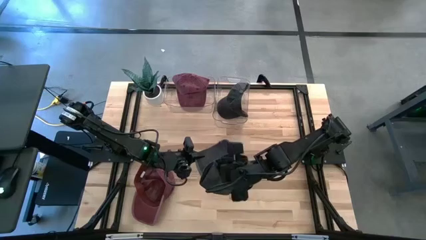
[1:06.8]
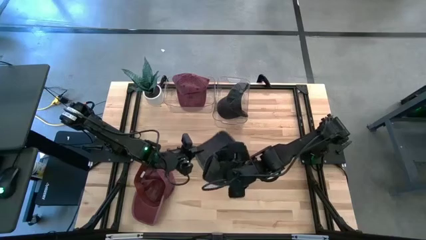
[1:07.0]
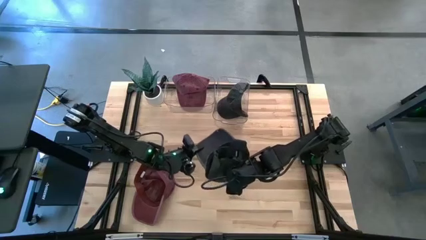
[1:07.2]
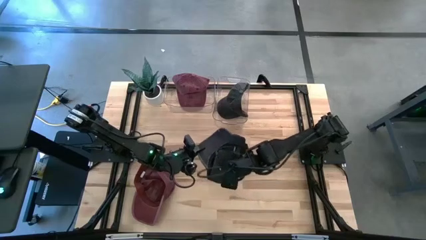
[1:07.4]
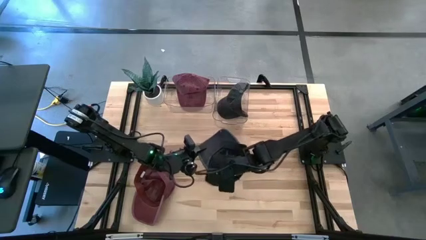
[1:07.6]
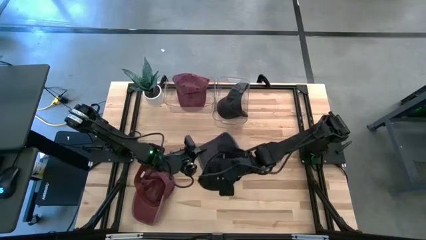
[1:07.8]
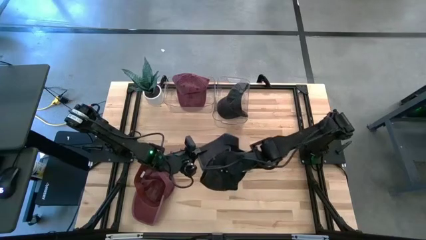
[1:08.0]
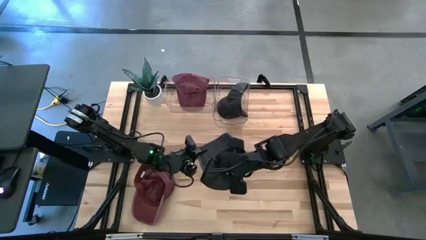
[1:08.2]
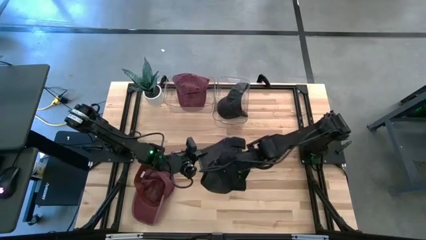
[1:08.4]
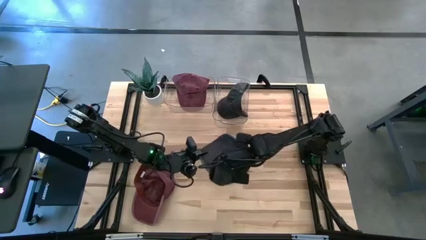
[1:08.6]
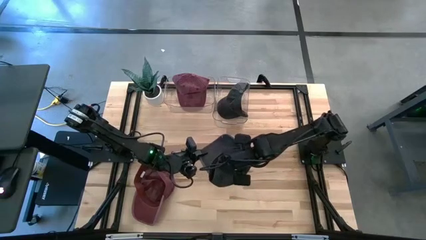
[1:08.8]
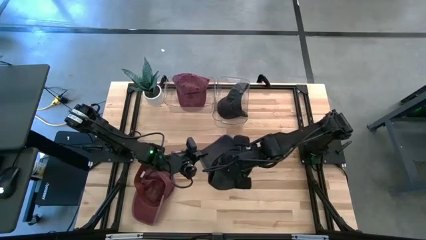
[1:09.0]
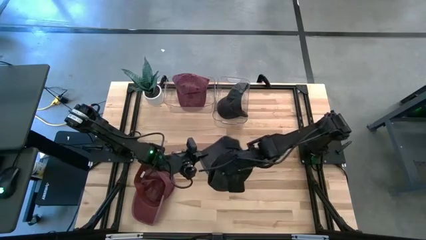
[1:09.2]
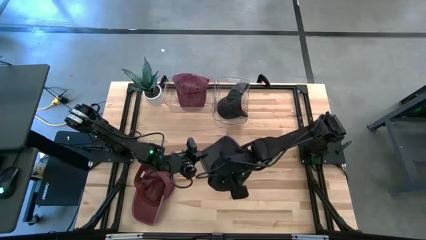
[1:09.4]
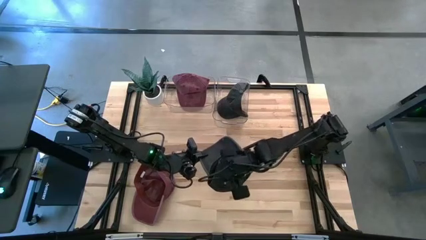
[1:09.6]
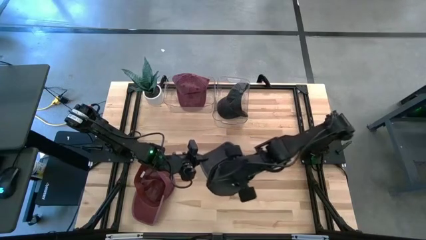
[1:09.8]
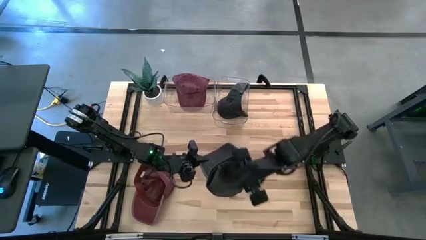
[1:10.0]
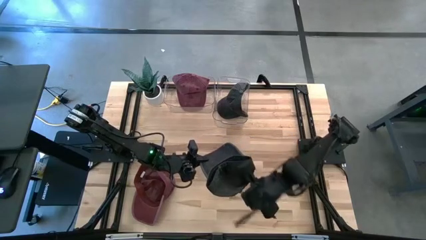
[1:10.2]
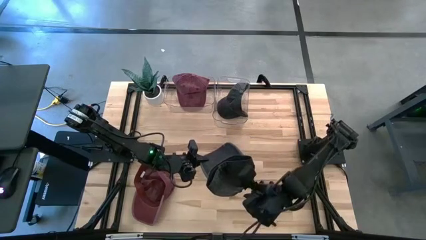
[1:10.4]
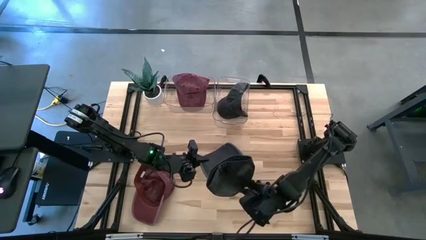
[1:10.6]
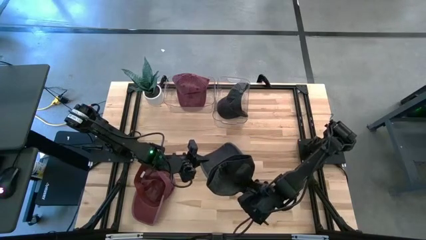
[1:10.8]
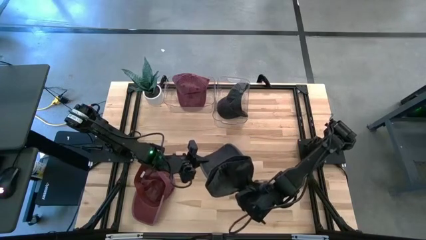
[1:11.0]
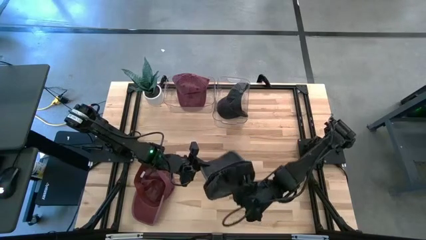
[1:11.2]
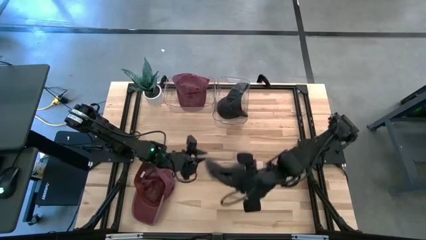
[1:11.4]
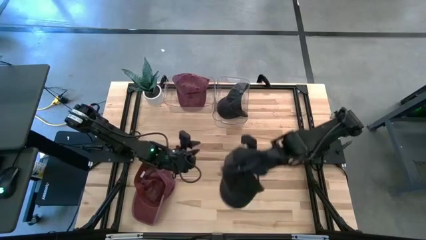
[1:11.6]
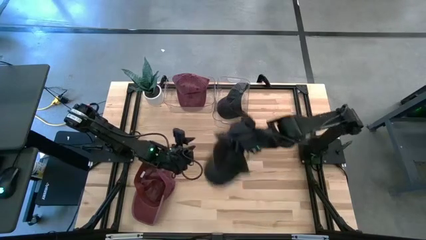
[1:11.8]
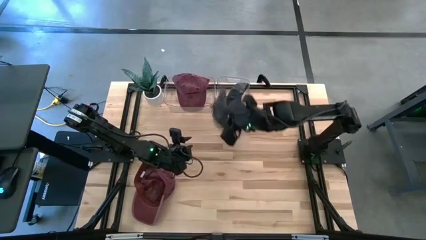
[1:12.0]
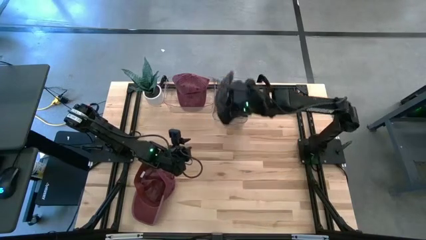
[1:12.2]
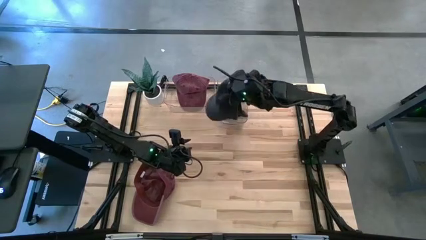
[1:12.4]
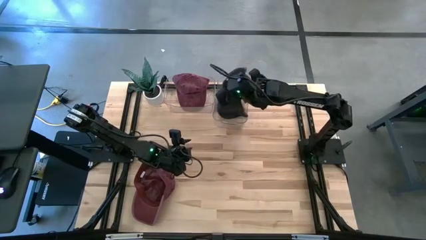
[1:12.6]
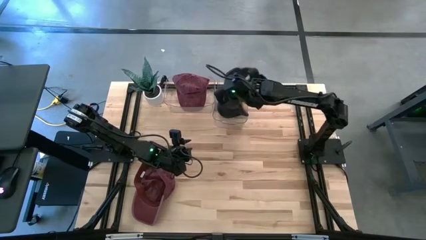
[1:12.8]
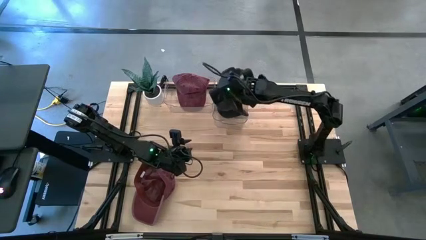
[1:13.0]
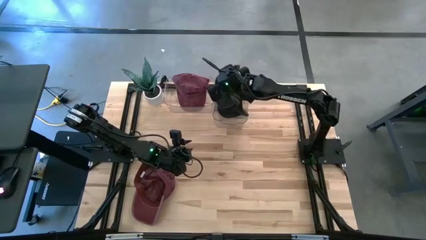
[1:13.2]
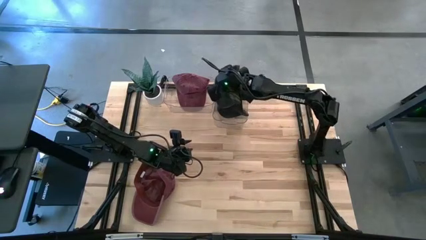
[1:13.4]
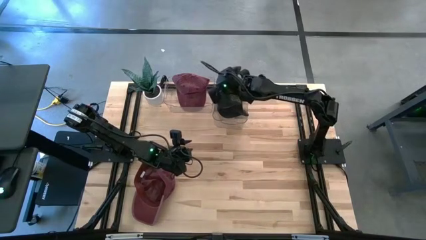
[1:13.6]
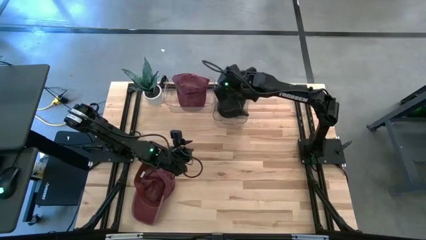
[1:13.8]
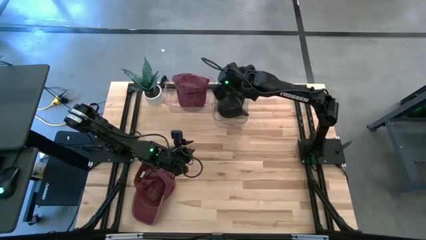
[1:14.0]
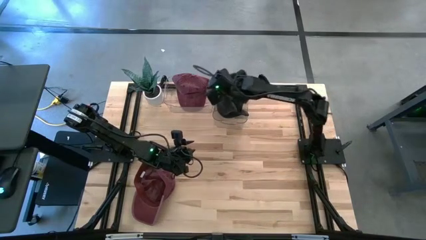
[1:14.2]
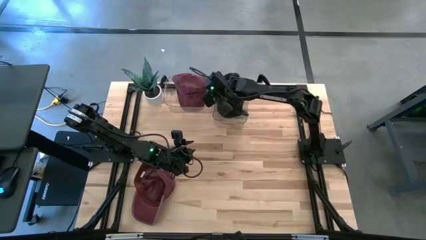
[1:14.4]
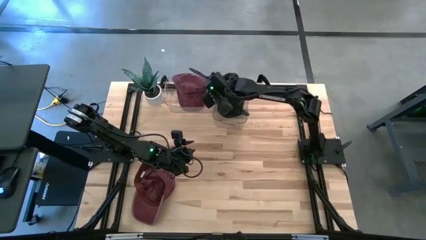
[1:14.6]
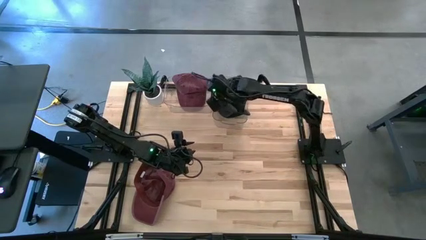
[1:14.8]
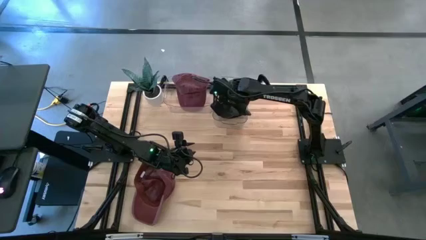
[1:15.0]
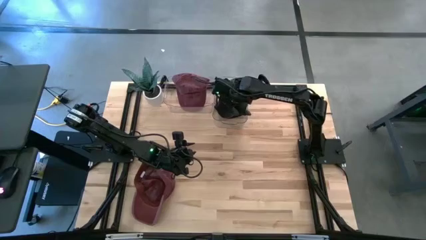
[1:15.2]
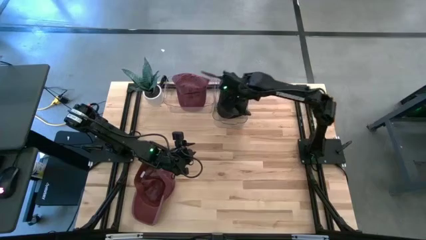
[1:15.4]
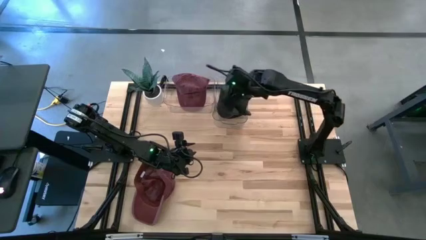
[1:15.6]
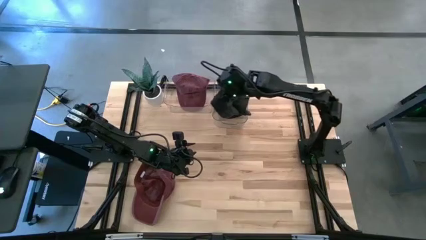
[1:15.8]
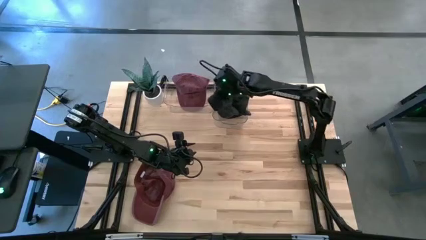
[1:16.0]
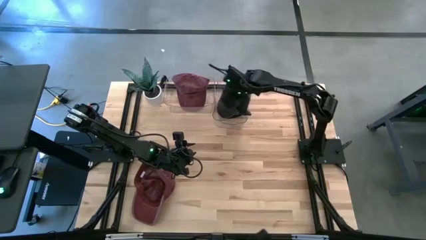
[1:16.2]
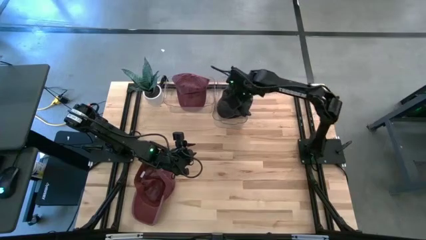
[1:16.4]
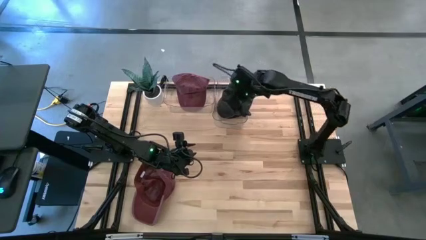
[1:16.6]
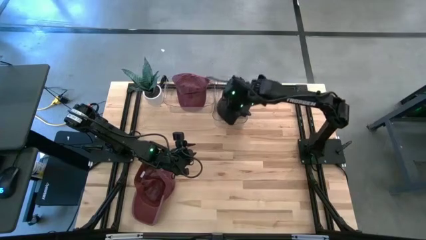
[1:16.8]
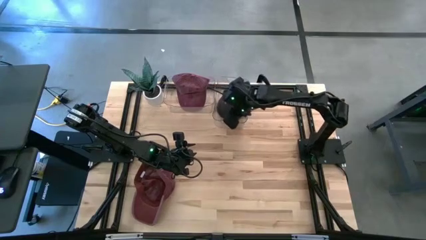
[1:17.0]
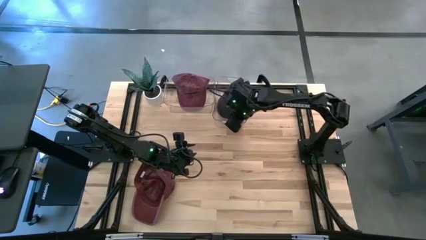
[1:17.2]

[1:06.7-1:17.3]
Task: Pick & Place hat
Put the black cap into the right transparent bin
